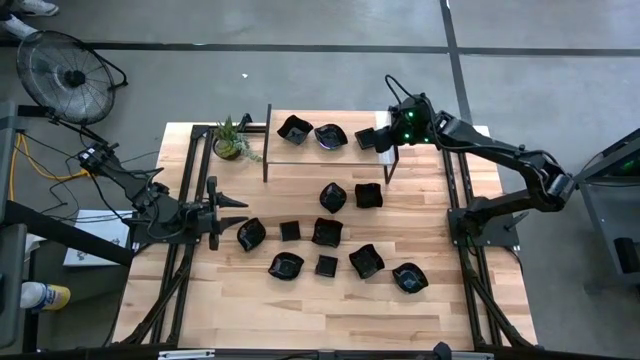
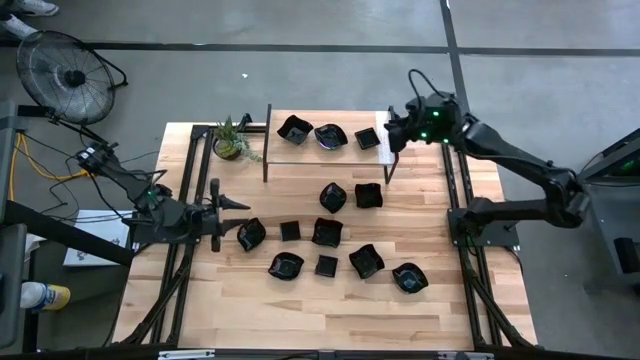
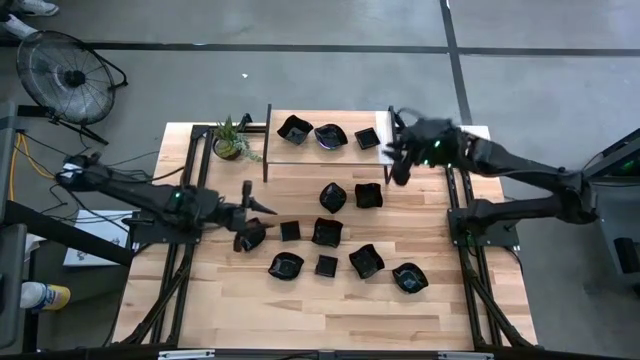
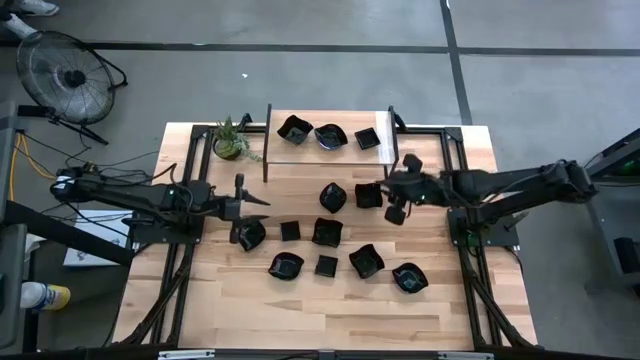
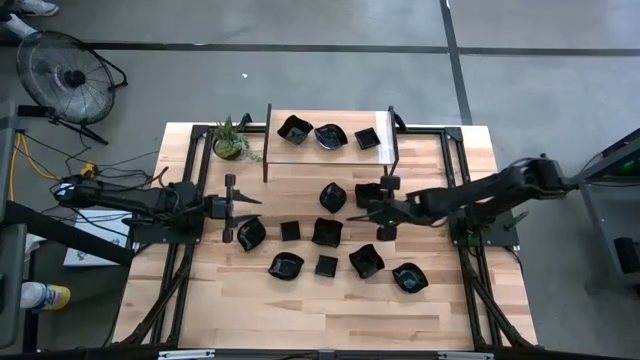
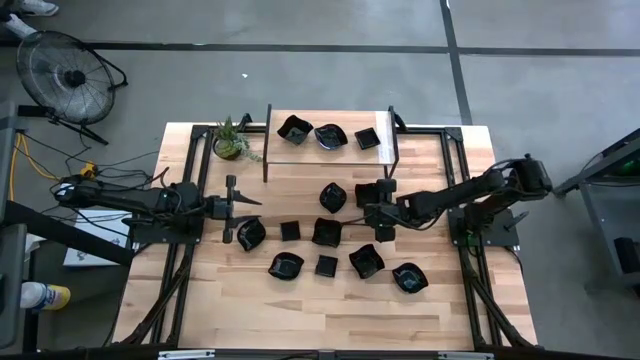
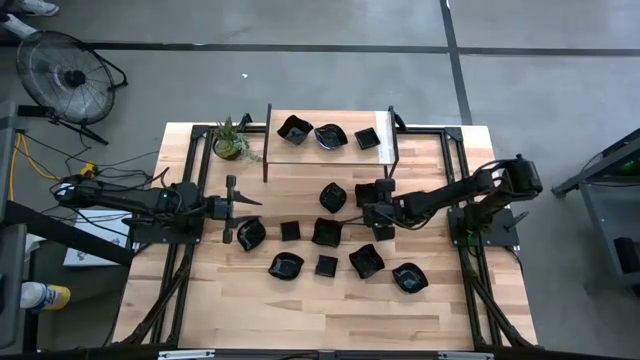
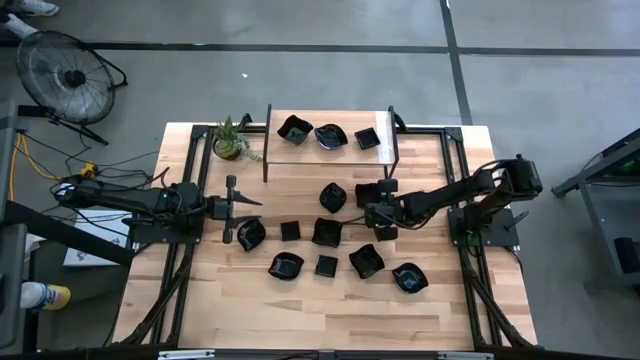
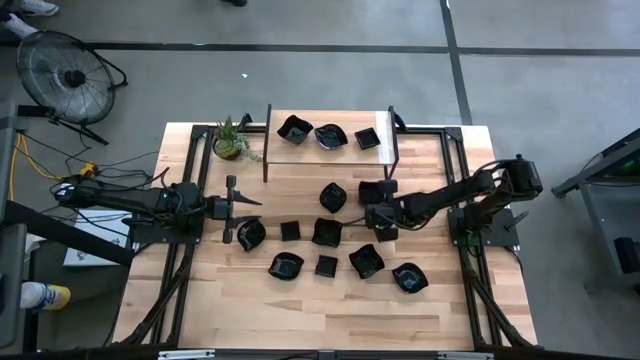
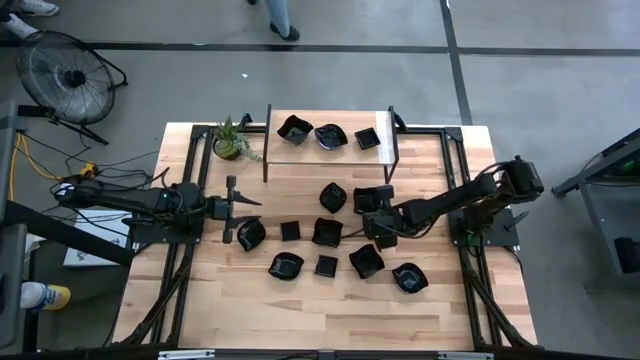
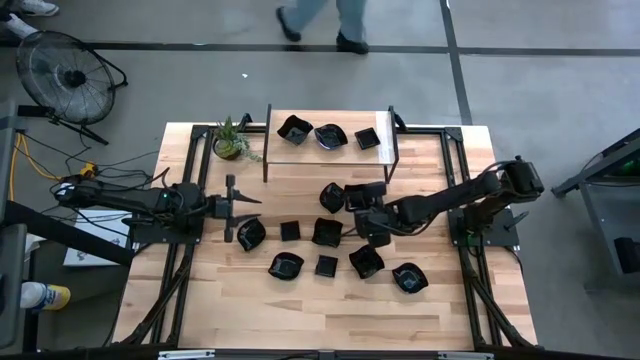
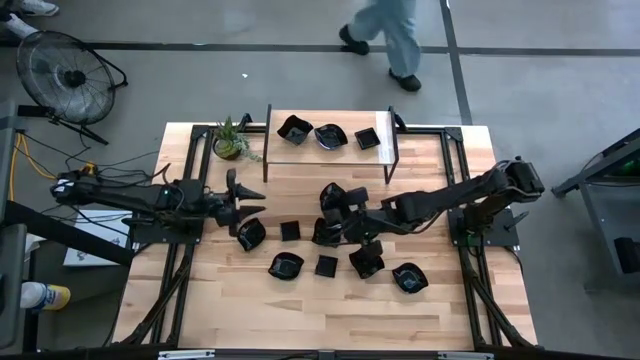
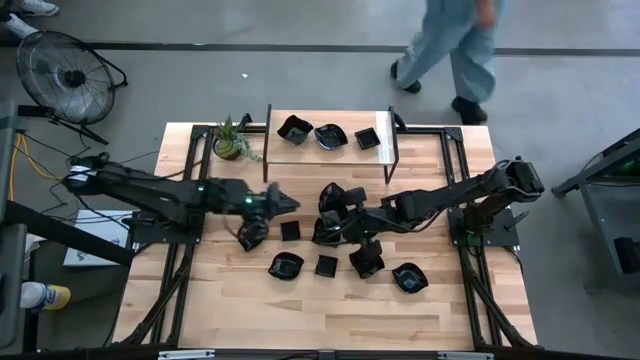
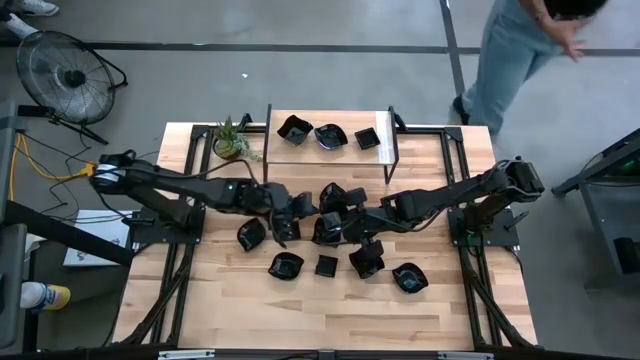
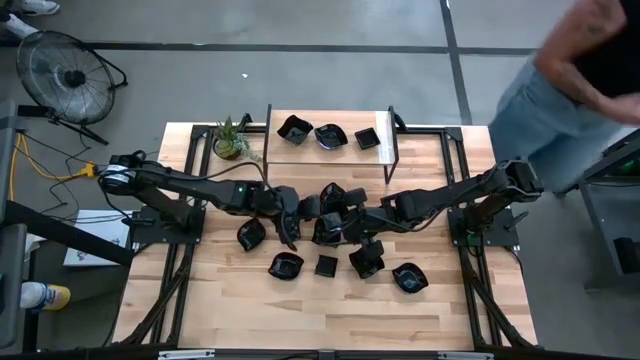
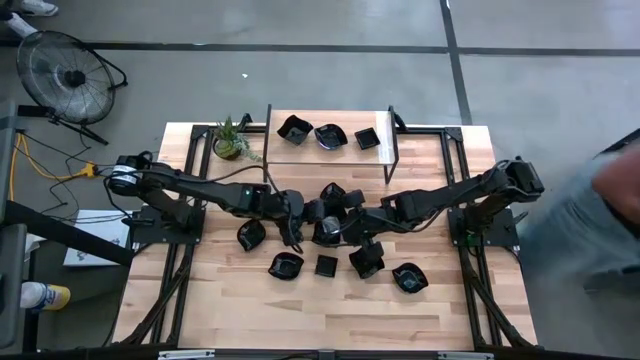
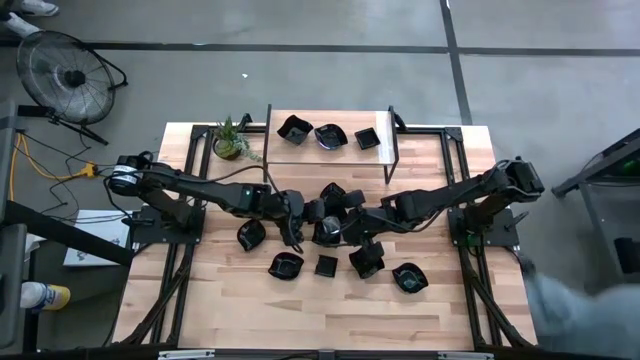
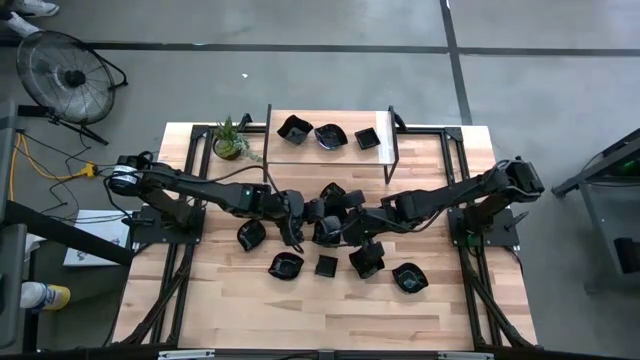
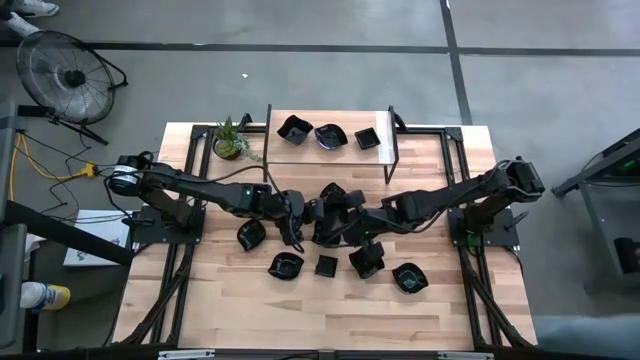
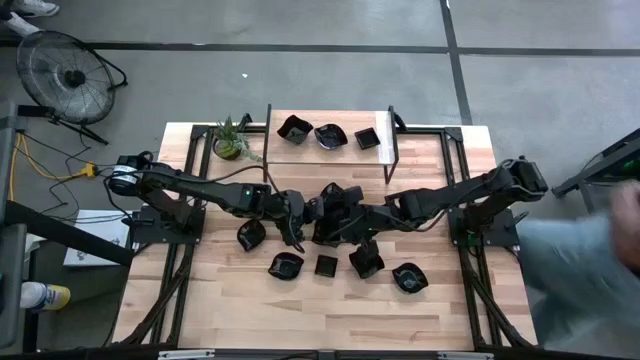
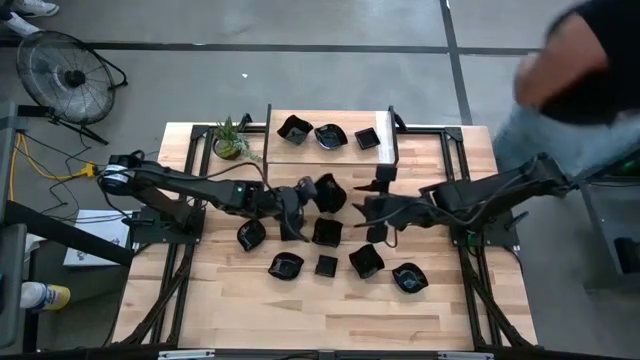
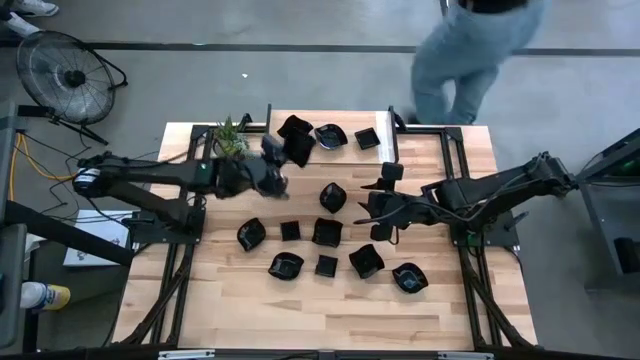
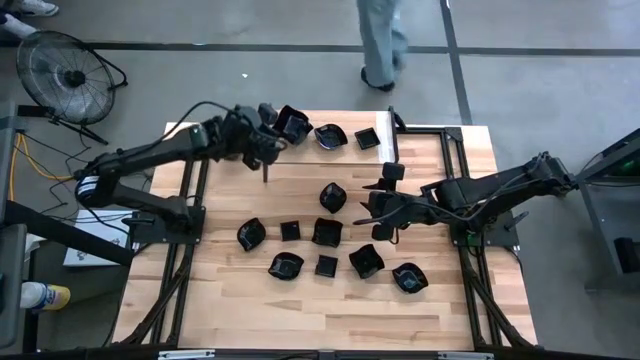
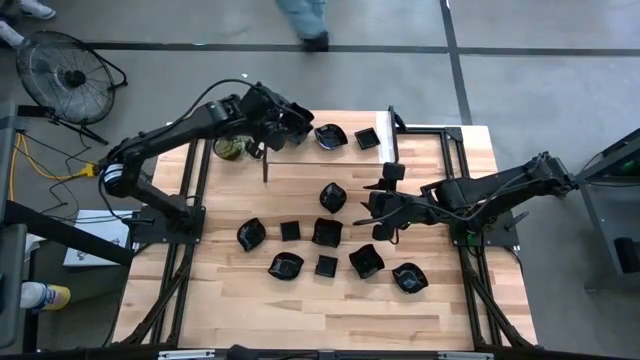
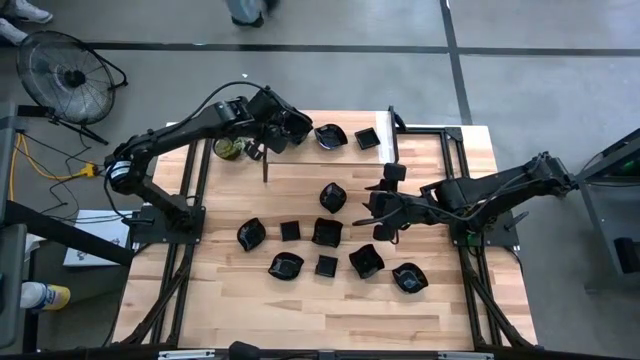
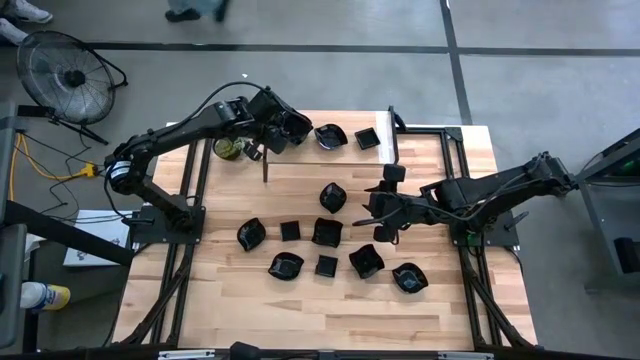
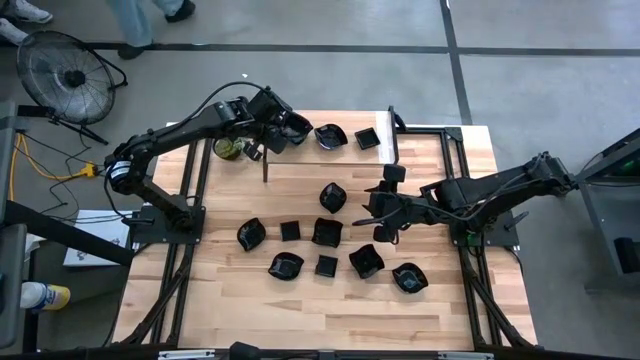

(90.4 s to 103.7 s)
Task: Pick & Place Mini shaped plates
Stack the black distorted square plate on top of the black distorted square plate on the shelf

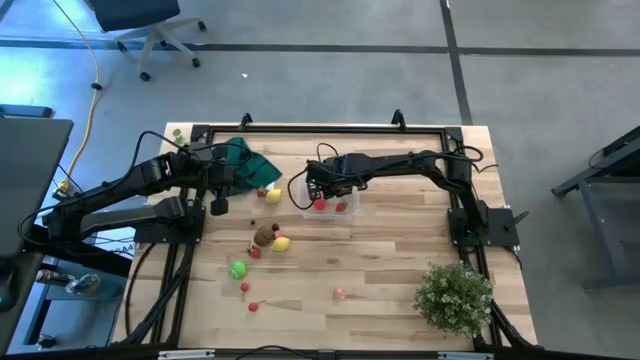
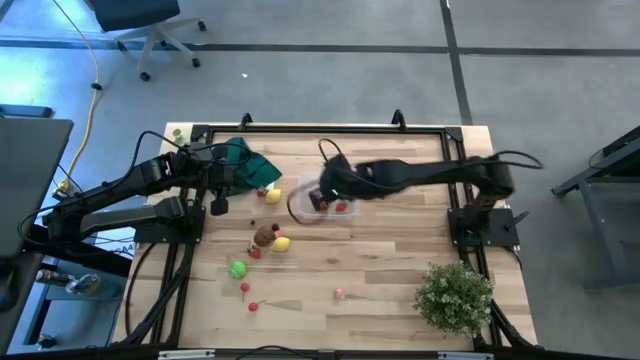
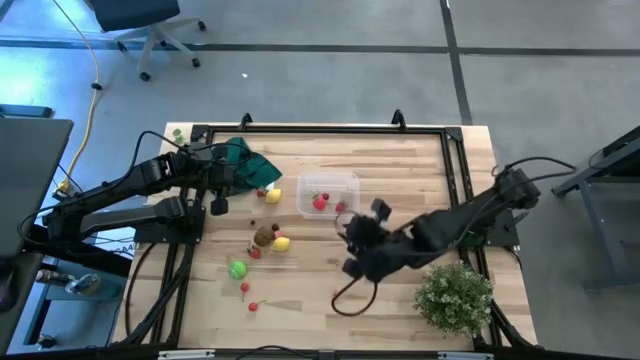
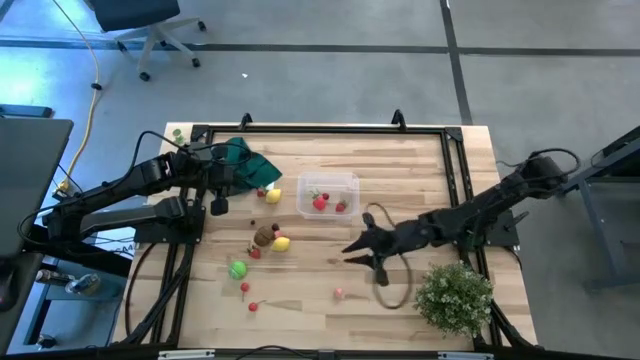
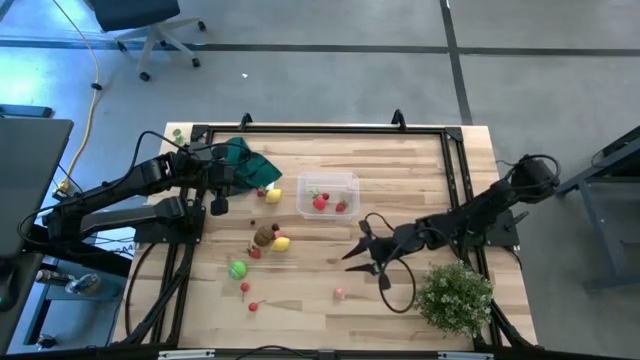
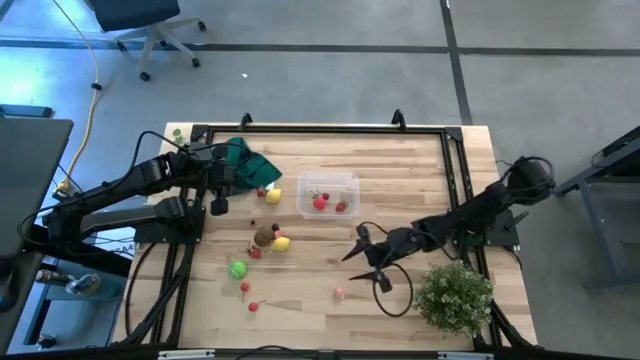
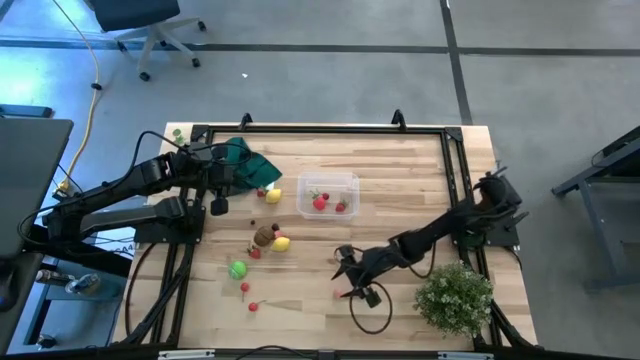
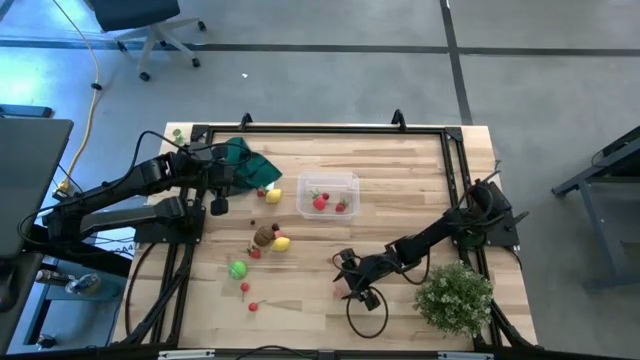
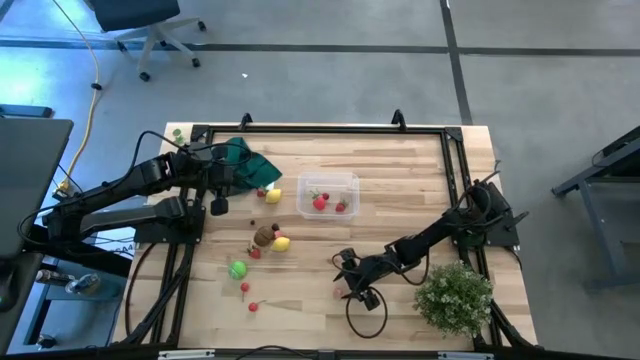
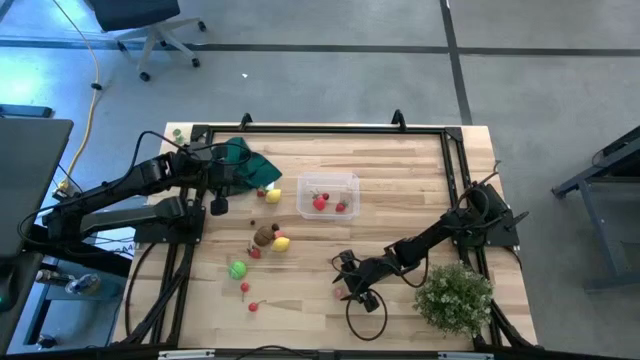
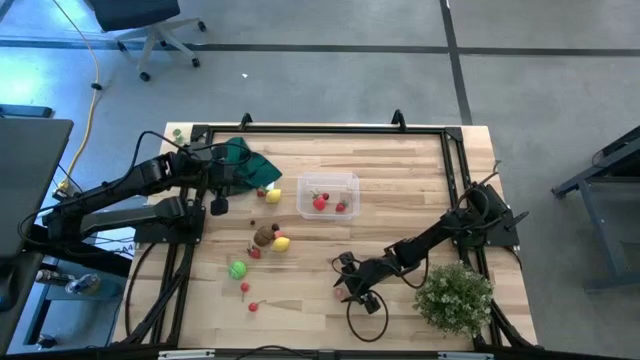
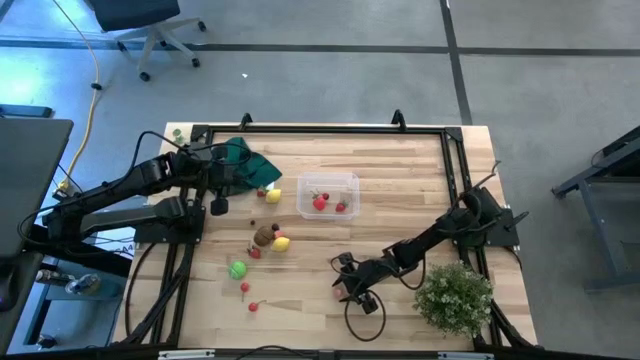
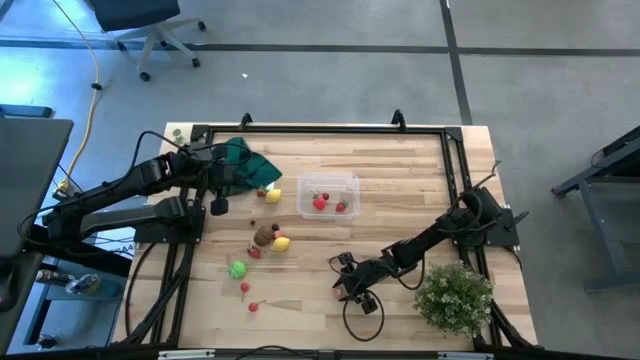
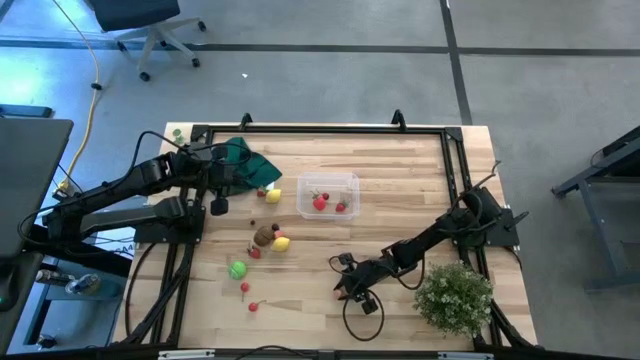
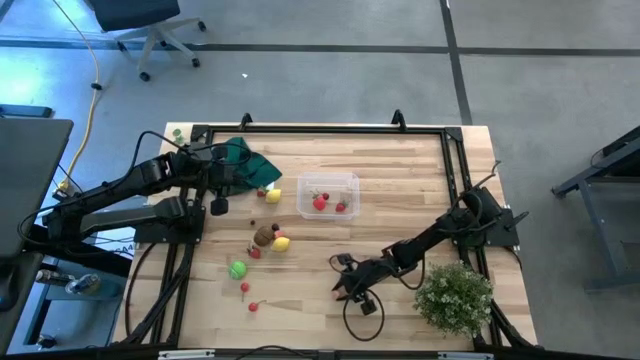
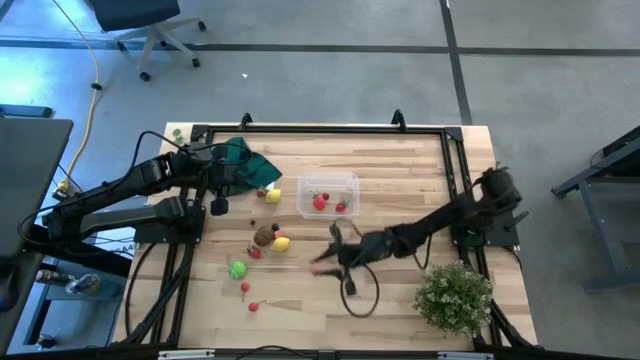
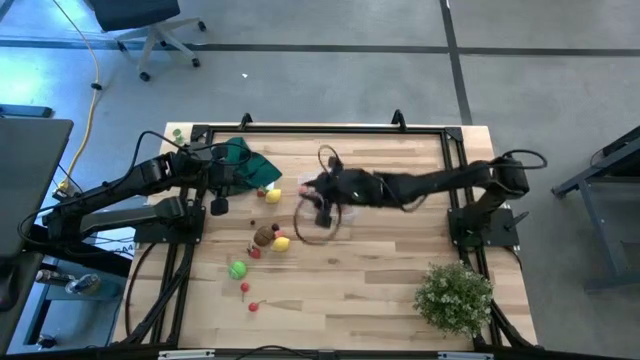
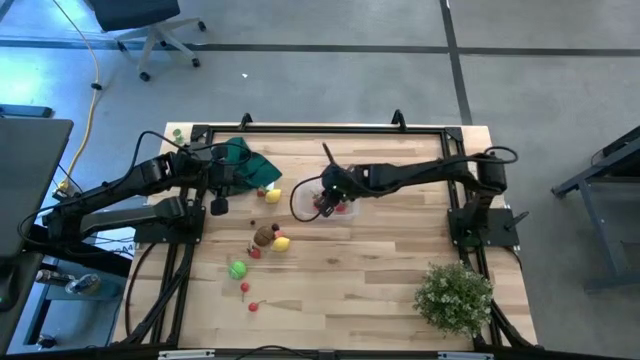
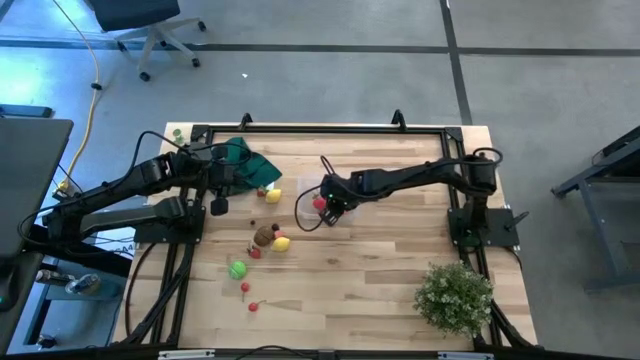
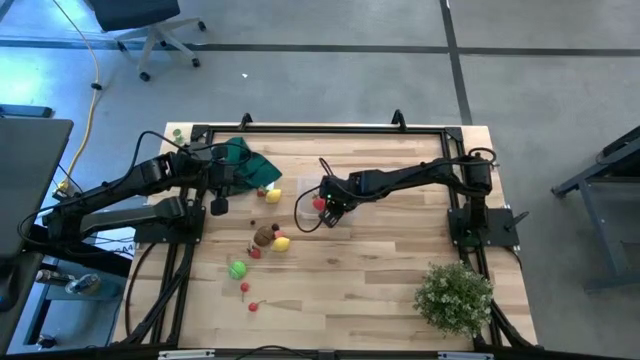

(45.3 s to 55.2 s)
Task: Pick and placing Produce into tupperware
Put the bottom pink apricot into the transparent bin
